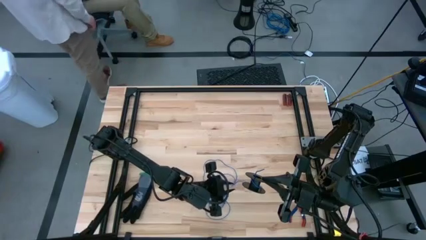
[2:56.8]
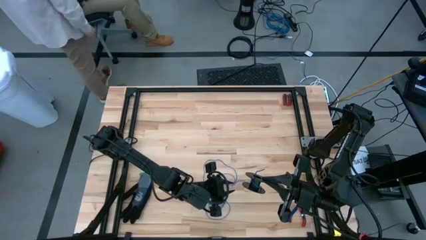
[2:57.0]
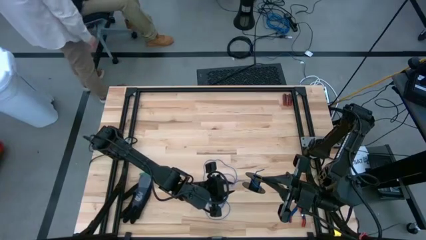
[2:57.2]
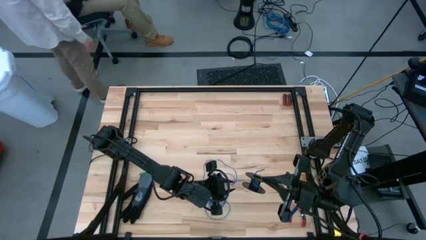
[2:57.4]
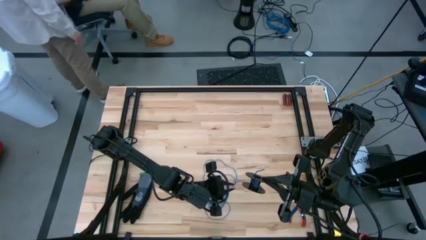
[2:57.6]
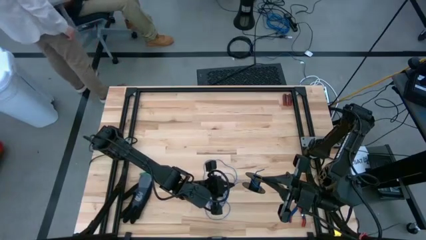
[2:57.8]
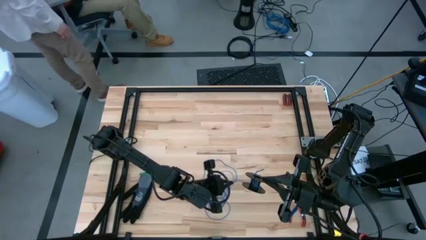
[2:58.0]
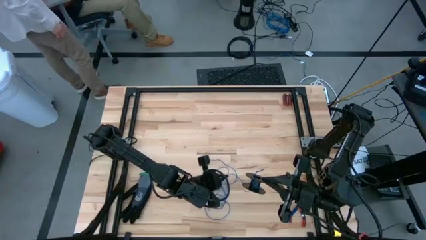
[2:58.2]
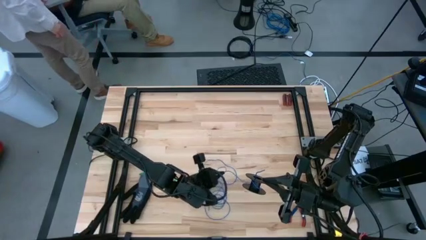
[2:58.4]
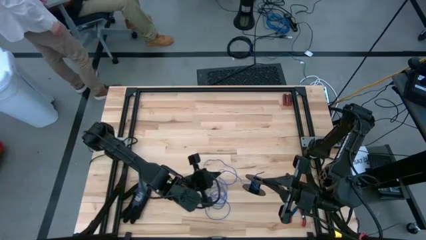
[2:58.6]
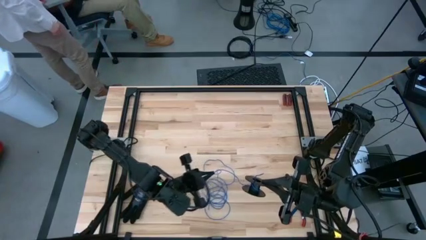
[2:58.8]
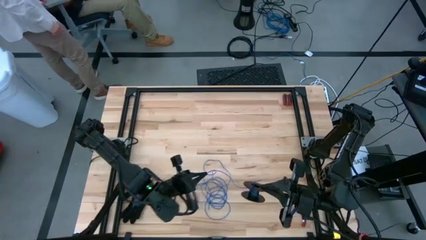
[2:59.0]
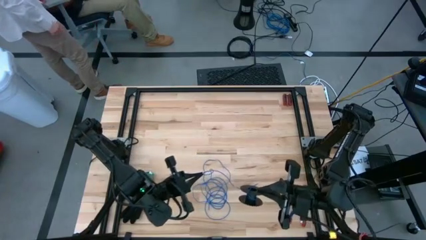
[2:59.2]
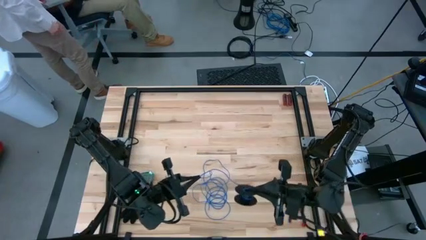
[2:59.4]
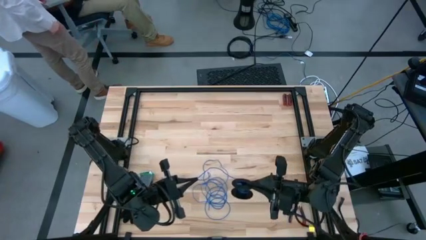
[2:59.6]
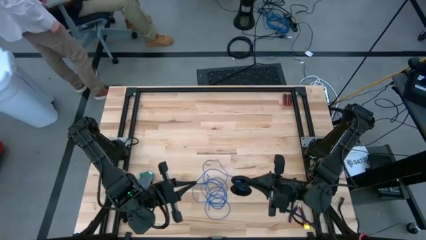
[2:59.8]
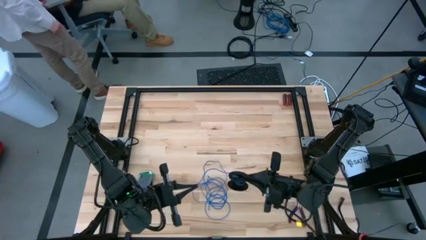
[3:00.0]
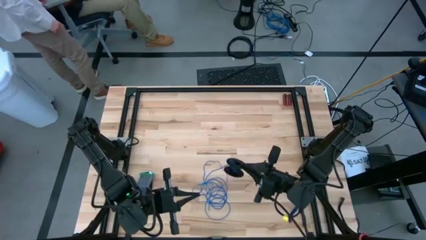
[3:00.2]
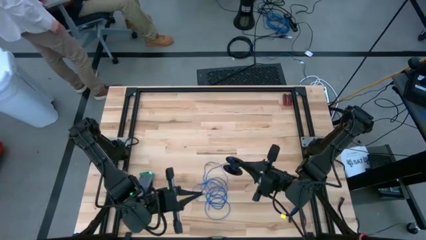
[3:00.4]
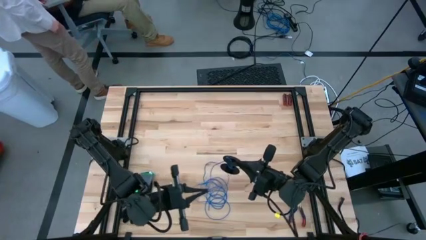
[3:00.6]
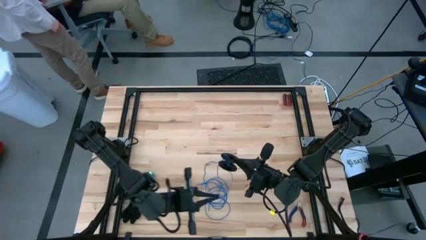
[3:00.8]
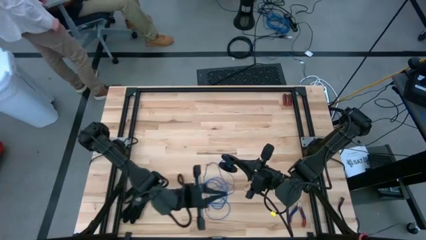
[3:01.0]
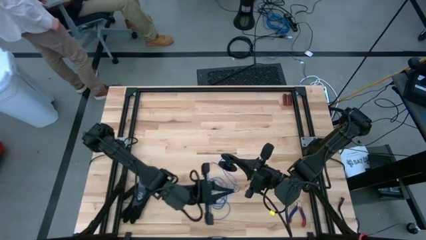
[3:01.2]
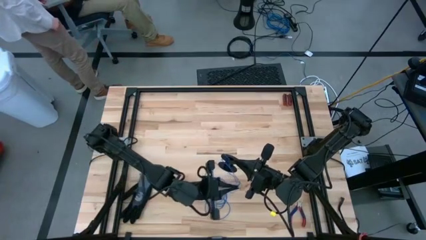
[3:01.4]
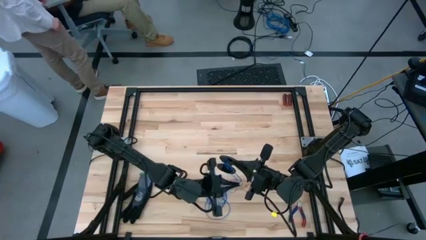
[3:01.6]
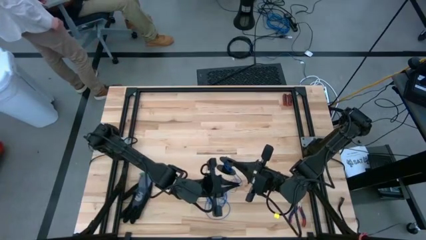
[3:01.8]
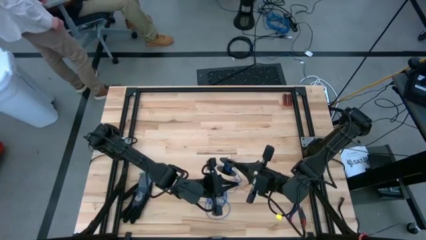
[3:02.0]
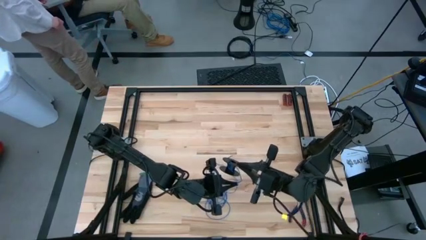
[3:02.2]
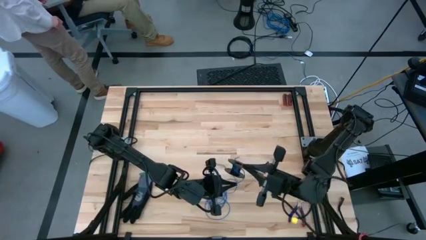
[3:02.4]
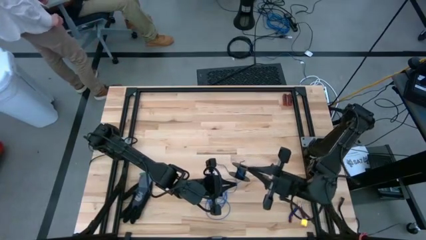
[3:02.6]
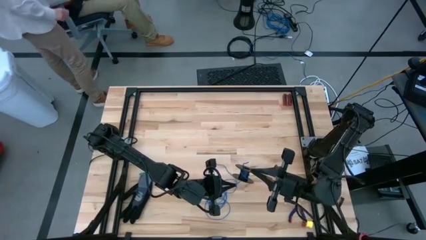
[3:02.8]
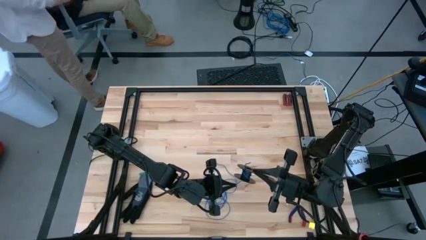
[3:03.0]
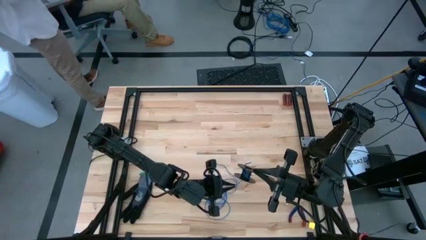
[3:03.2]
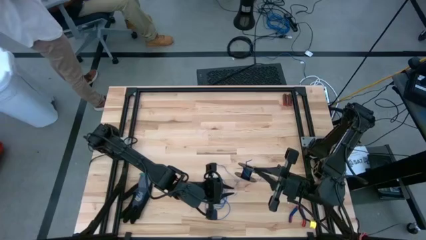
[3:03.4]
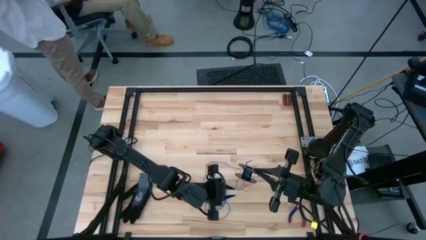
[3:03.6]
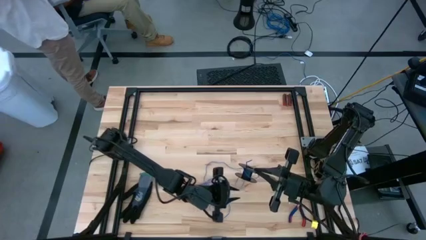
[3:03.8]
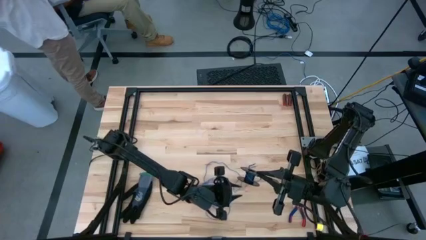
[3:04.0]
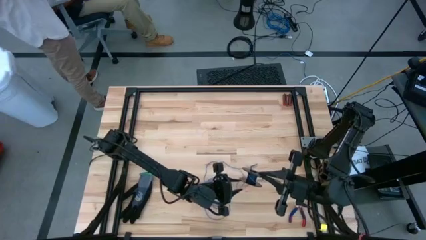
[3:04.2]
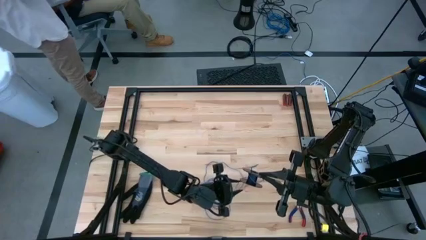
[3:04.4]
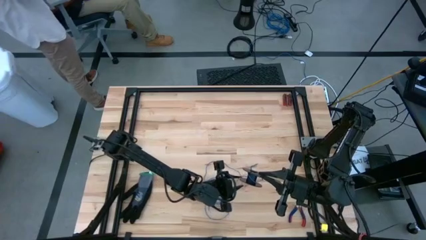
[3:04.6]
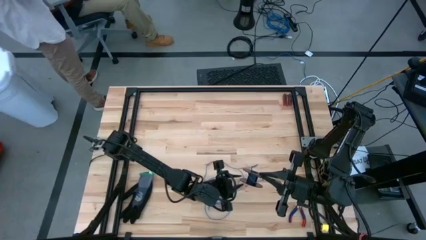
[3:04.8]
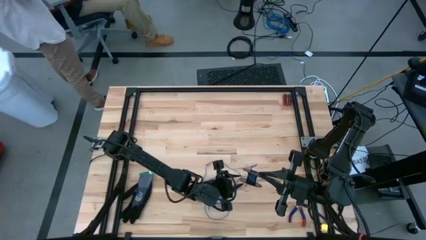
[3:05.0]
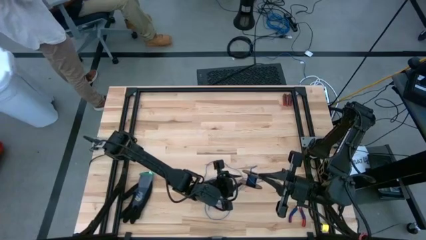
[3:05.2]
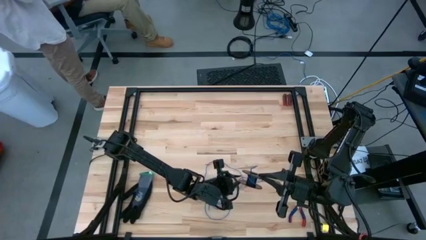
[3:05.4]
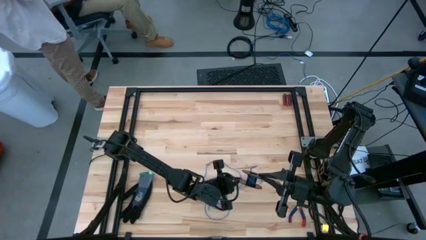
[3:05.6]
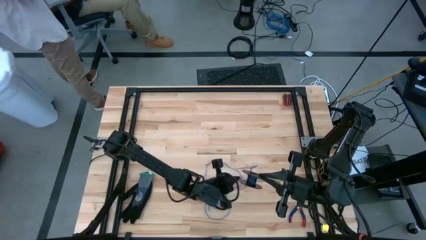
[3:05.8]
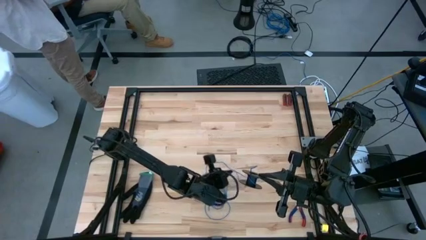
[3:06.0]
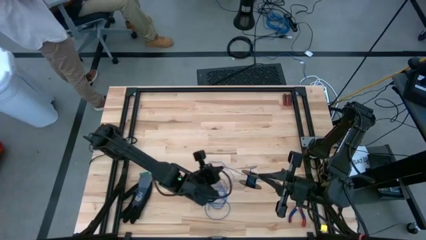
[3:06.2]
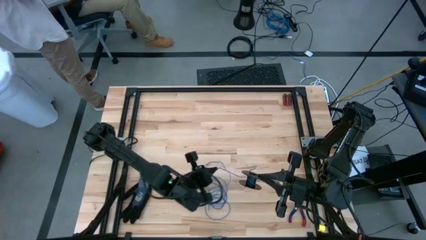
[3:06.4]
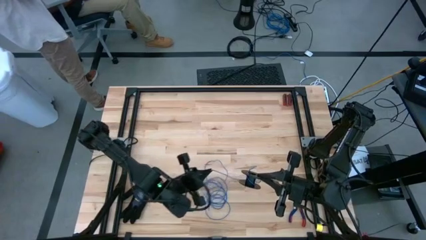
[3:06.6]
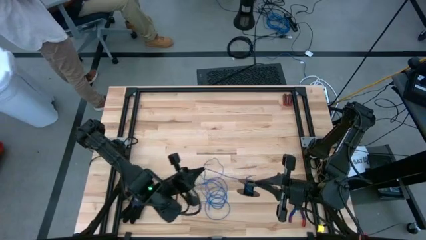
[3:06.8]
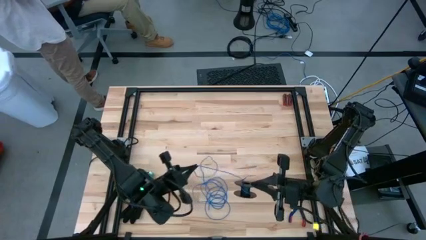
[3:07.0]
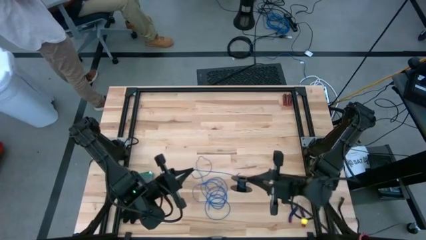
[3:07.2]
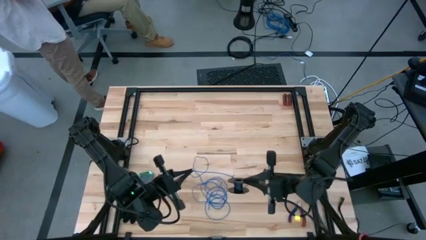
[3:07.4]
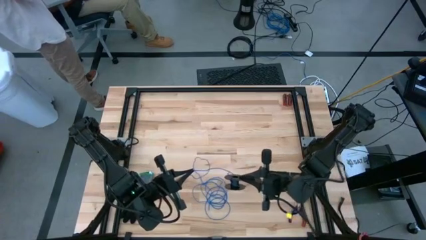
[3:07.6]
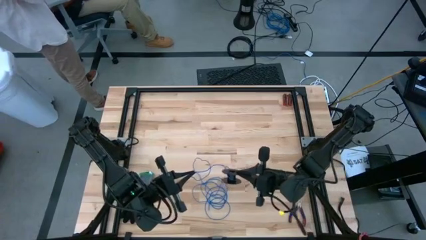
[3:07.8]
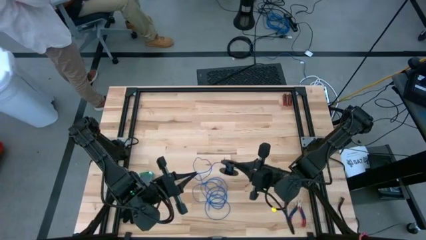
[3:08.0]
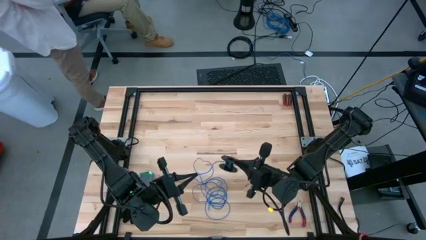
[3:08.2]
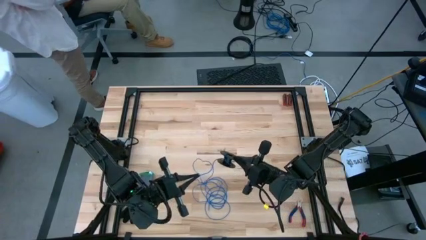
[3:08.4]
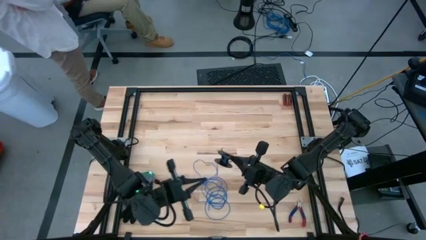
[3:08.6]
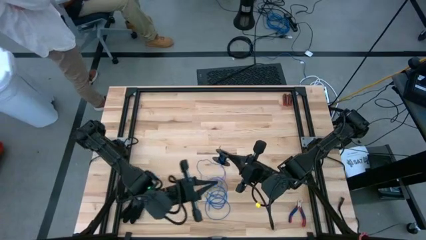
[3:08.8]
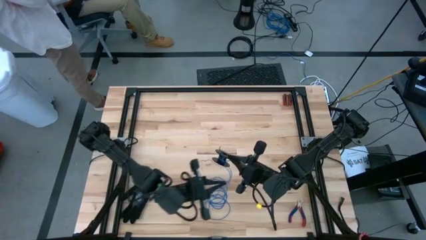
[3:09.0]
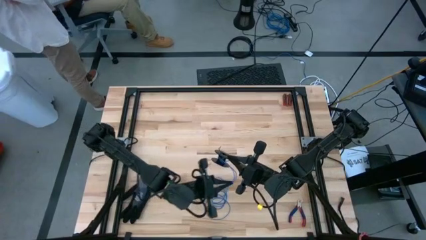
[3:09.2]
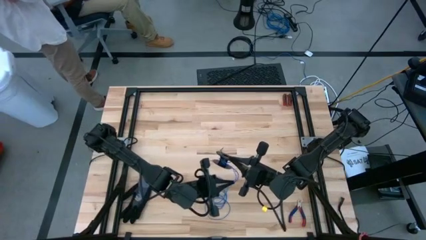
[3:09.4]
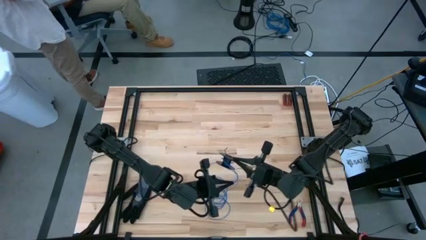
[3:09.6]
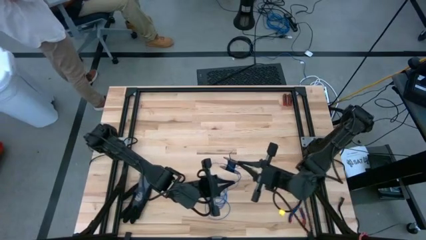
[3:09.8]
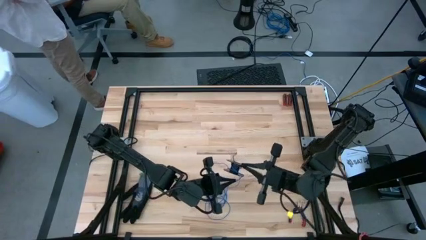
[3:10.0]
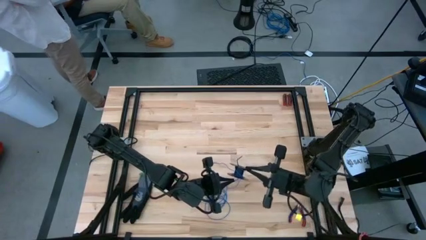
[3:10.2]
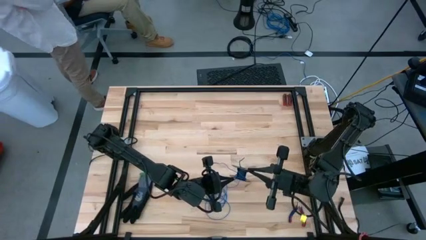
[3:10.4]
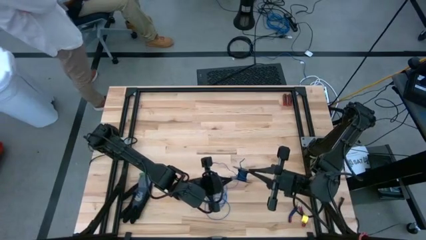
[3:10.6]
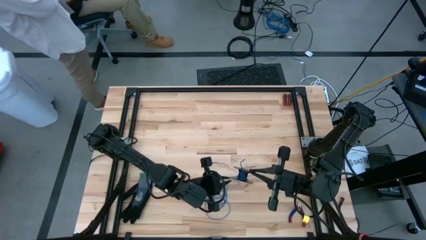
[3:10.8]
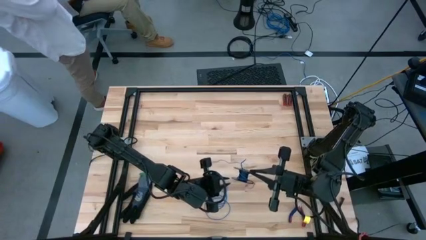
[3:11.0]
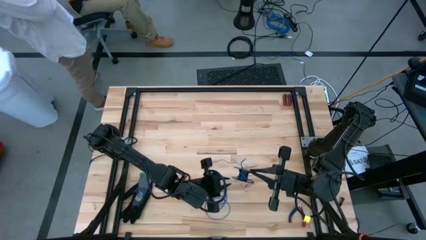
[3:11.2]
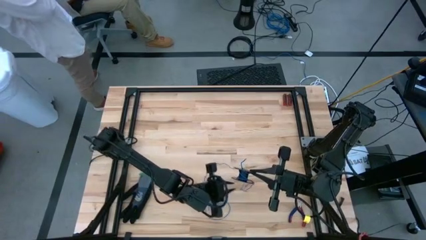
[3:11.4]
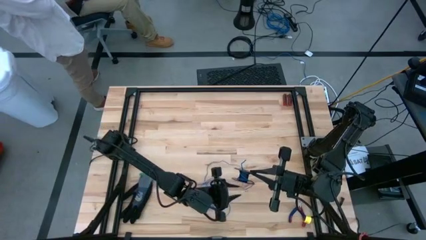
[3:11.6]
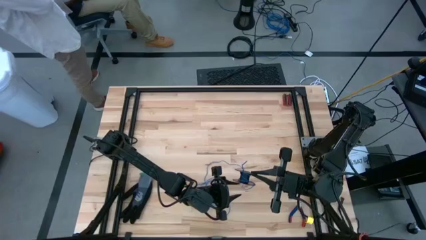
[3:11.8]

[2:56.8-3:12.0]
Task: Coil cords
Coil the blue wire onto the spool

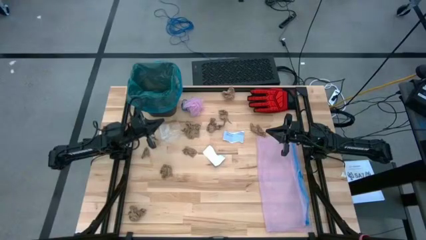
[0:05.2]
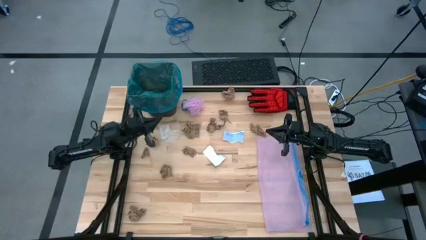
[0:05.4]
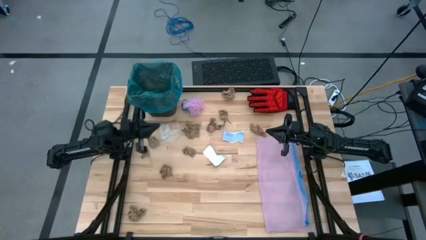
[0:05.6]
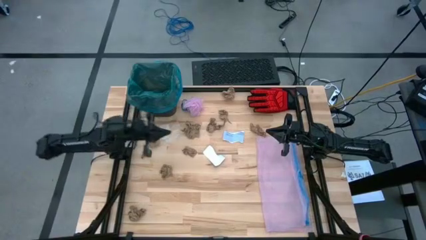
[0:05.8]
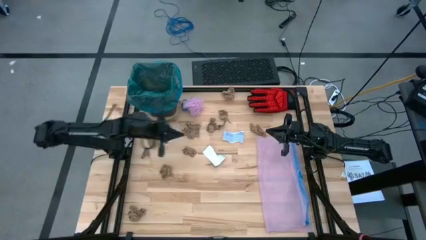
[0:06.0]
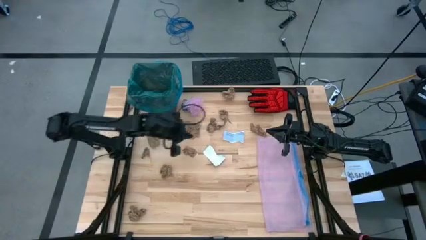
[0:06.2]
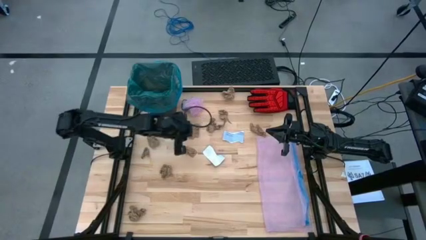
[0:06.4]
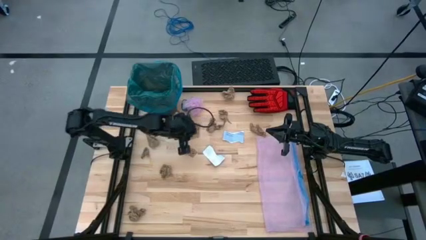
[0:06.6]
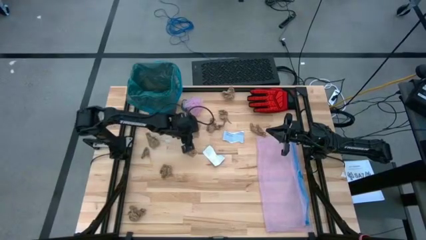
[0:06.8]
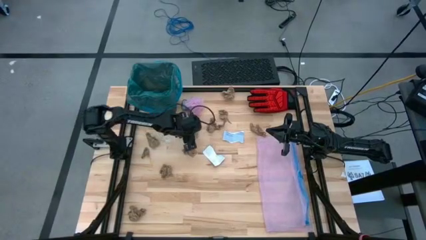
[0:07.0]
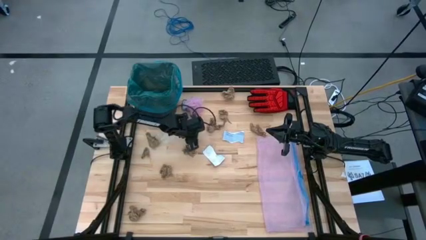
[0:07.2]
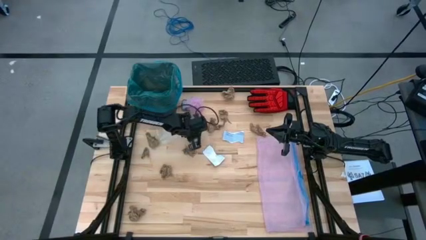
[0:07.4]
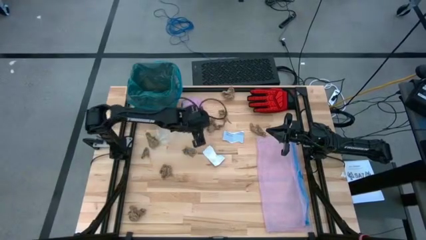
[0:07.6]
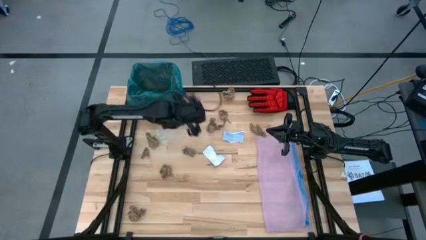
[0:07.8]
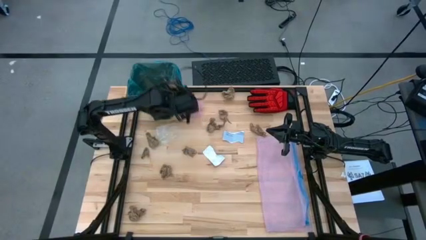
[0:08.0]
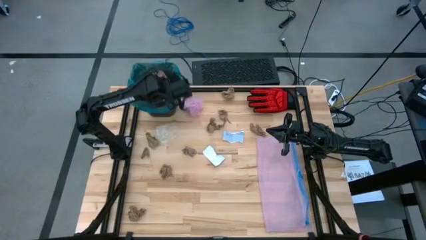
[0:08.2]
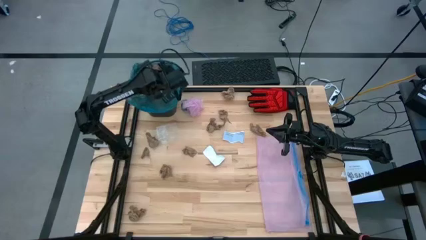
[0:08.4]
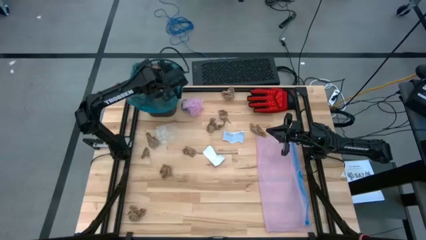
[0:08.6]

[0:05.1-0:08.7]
Task: place trash/remove bag and relplace
Put the brown napkin into the trash bin
